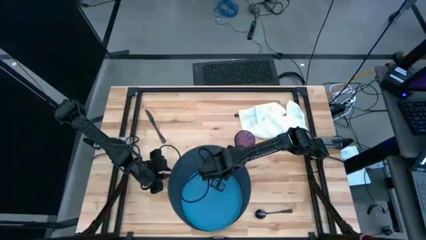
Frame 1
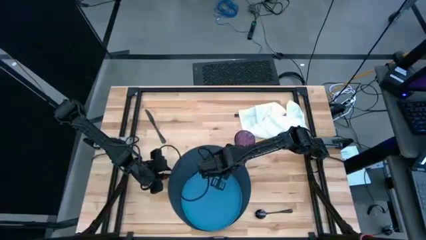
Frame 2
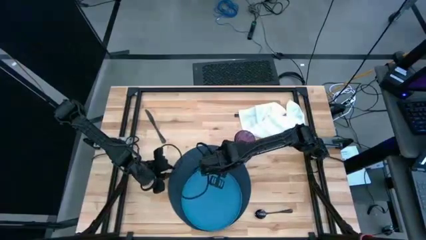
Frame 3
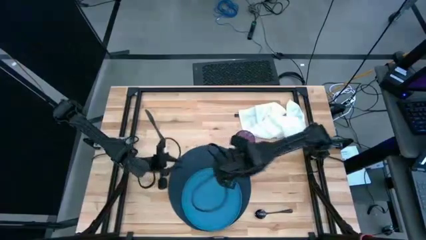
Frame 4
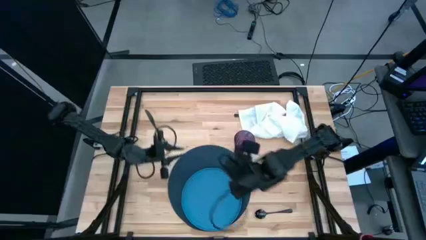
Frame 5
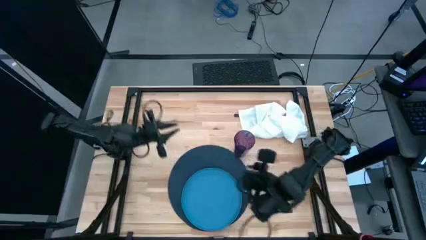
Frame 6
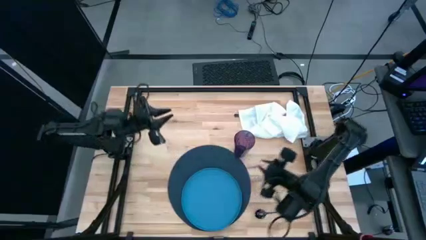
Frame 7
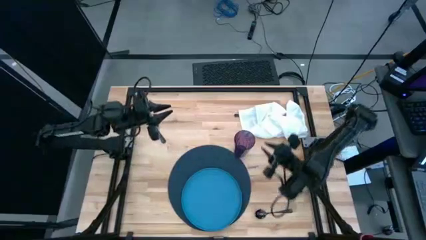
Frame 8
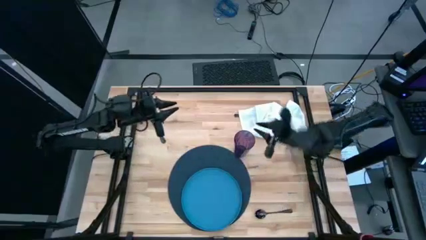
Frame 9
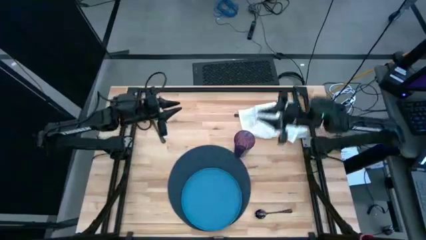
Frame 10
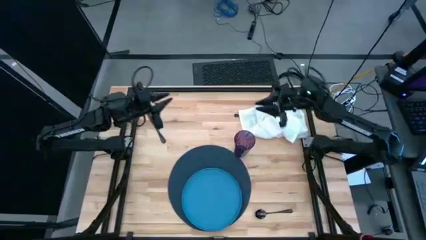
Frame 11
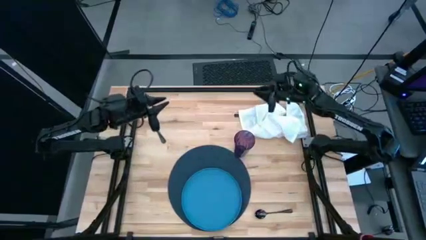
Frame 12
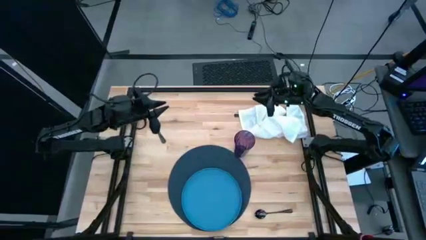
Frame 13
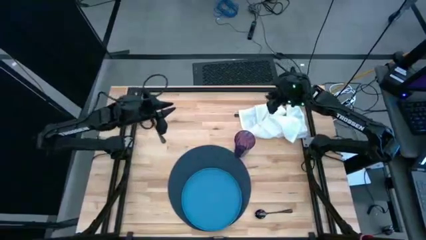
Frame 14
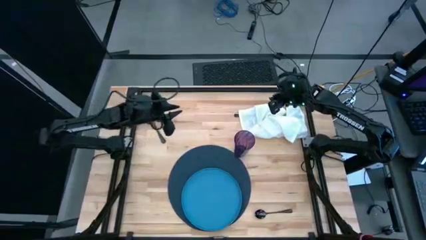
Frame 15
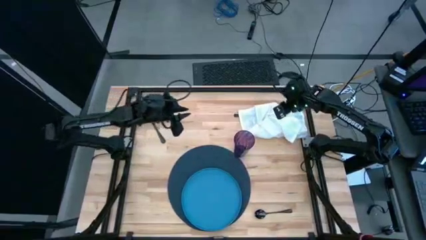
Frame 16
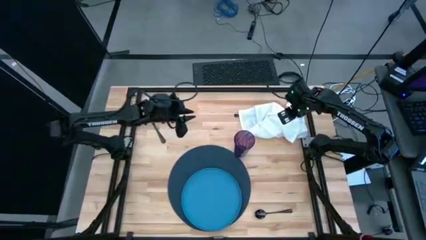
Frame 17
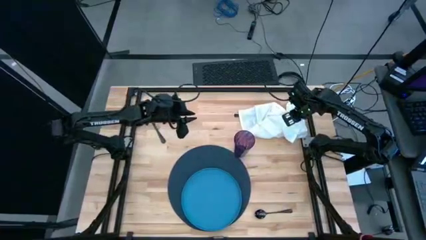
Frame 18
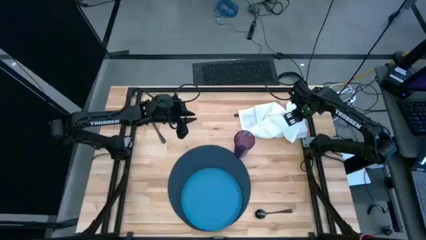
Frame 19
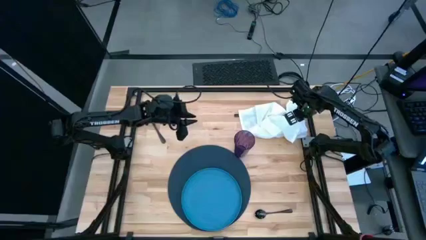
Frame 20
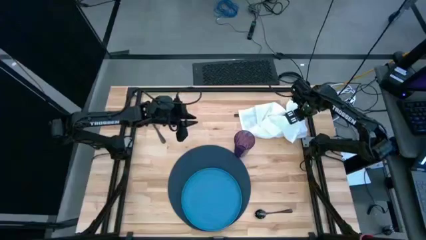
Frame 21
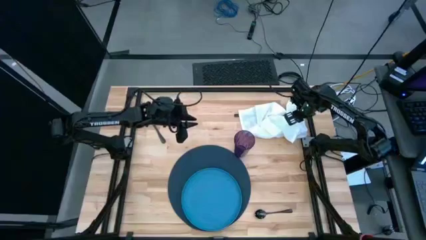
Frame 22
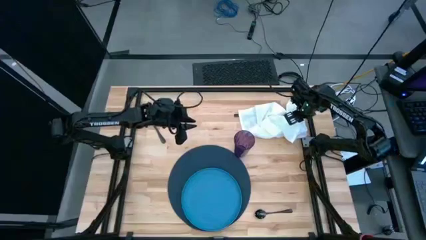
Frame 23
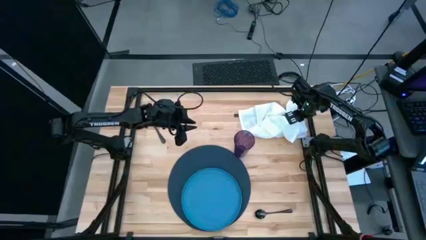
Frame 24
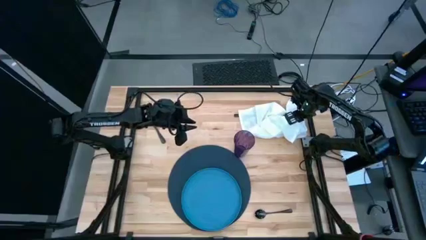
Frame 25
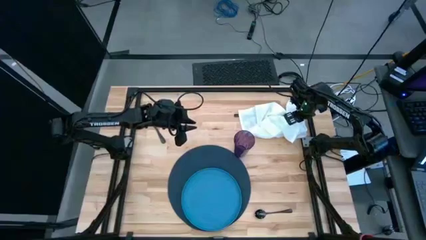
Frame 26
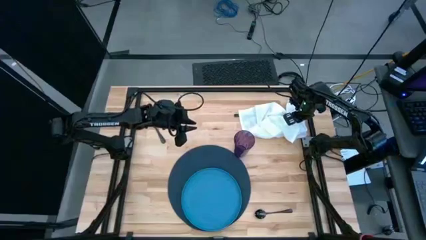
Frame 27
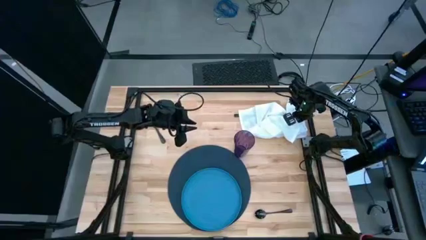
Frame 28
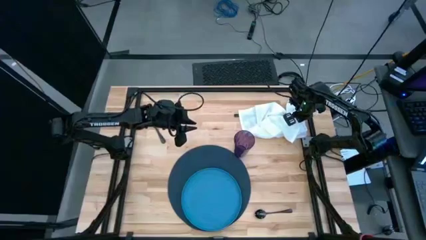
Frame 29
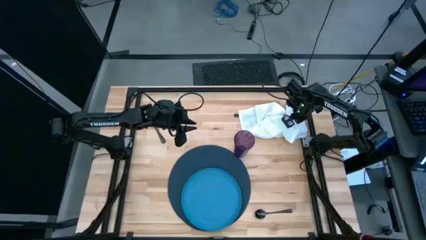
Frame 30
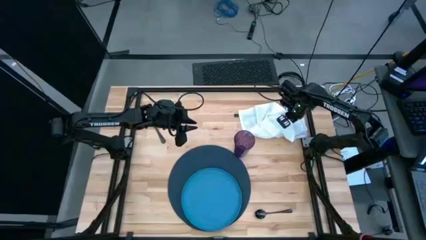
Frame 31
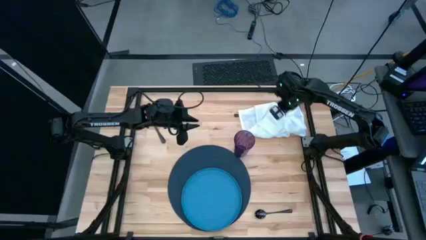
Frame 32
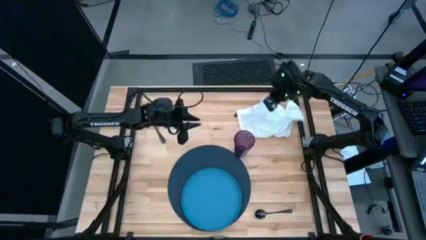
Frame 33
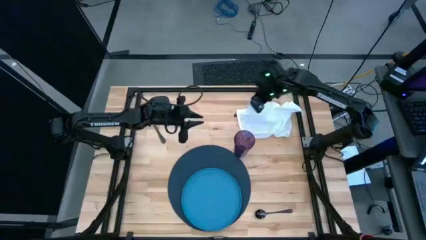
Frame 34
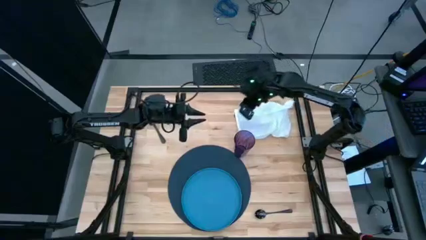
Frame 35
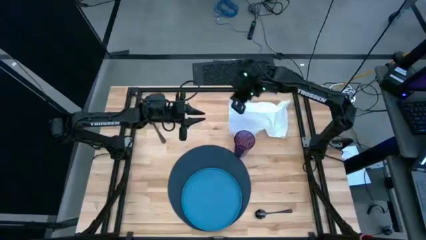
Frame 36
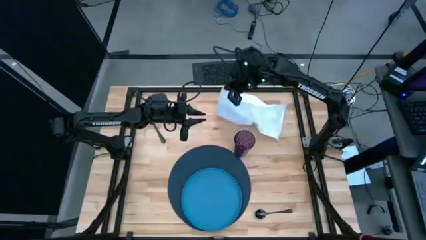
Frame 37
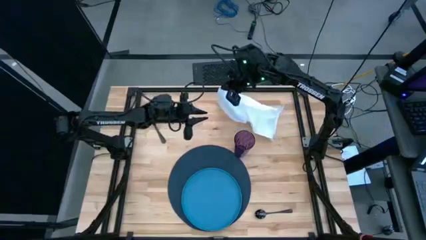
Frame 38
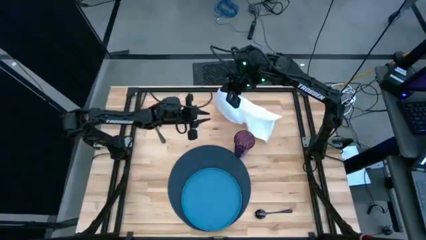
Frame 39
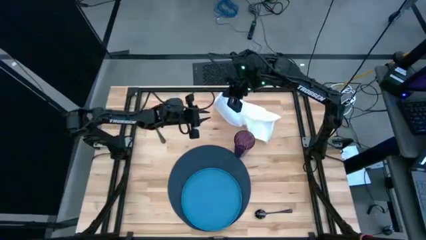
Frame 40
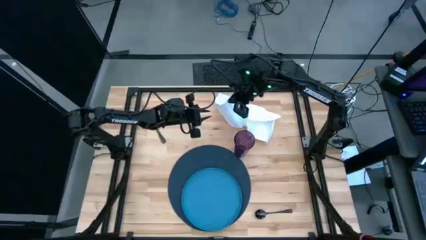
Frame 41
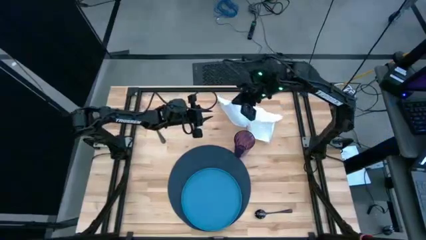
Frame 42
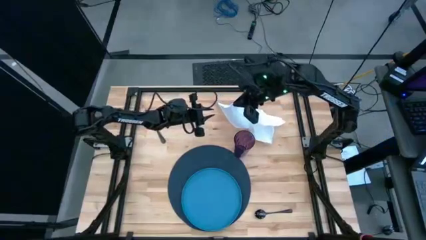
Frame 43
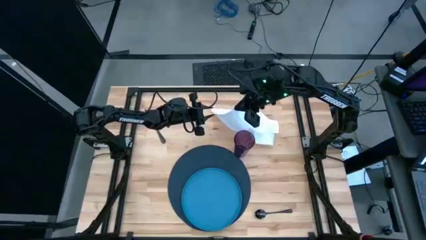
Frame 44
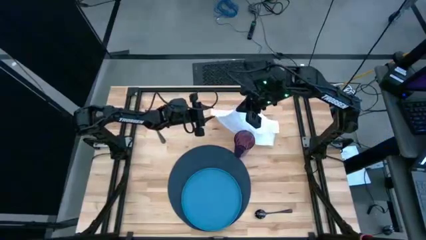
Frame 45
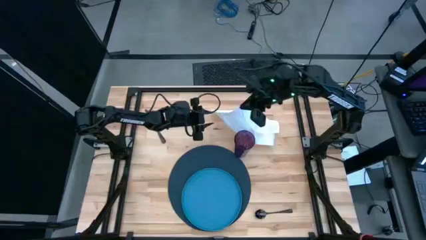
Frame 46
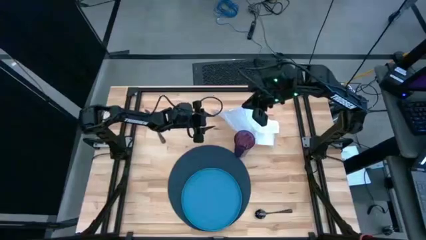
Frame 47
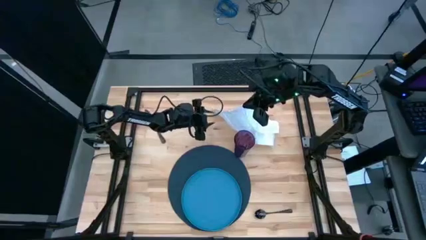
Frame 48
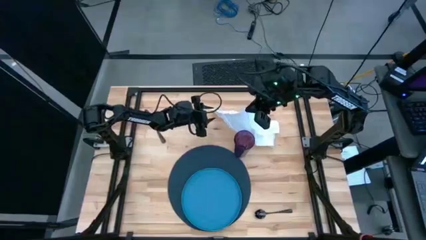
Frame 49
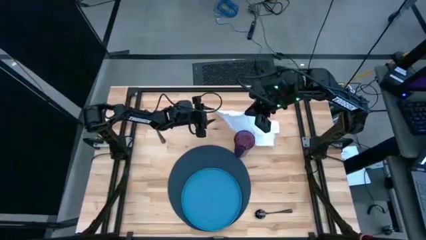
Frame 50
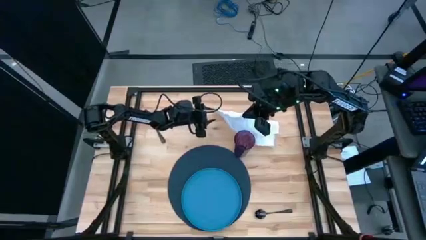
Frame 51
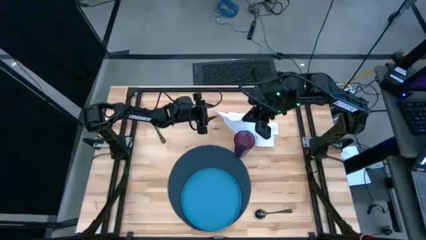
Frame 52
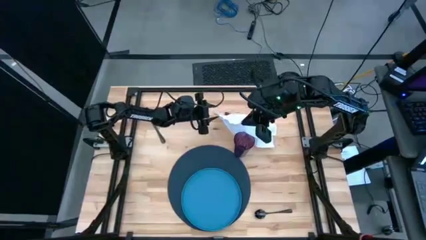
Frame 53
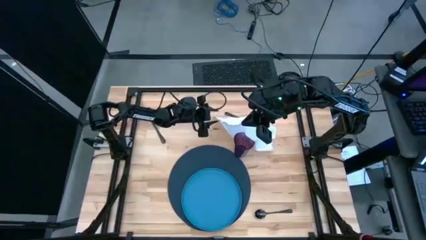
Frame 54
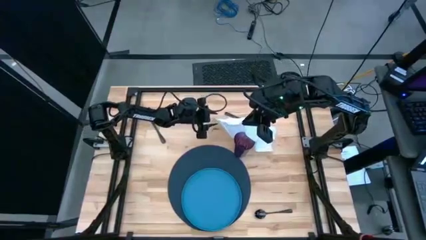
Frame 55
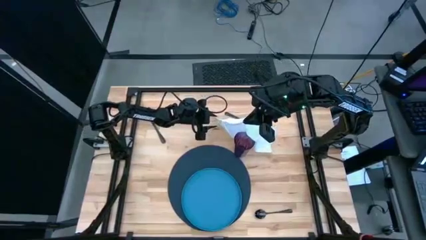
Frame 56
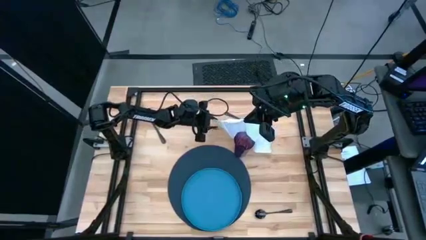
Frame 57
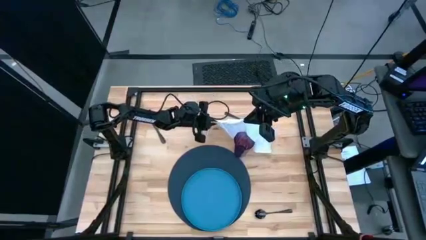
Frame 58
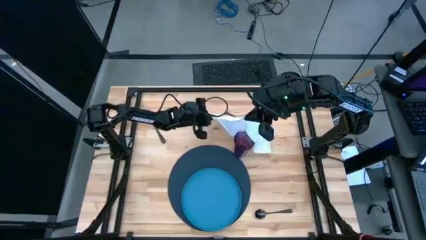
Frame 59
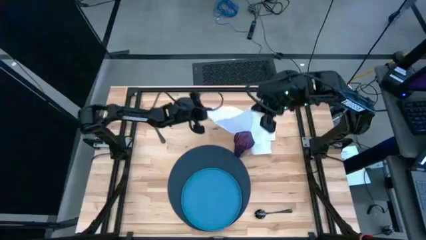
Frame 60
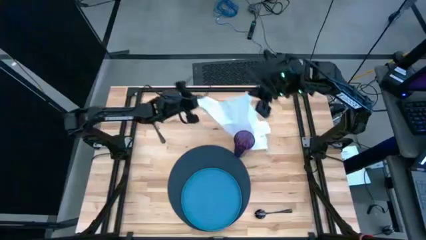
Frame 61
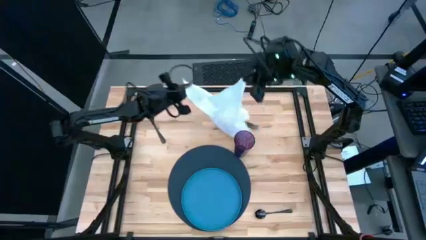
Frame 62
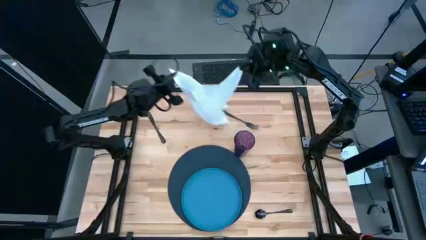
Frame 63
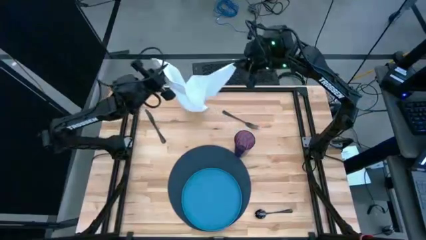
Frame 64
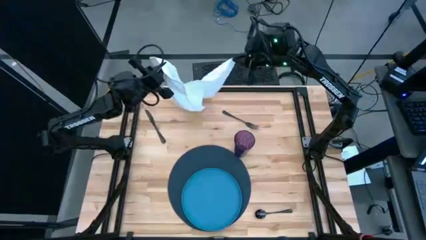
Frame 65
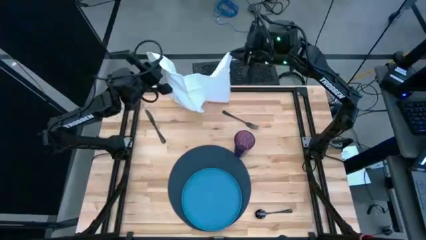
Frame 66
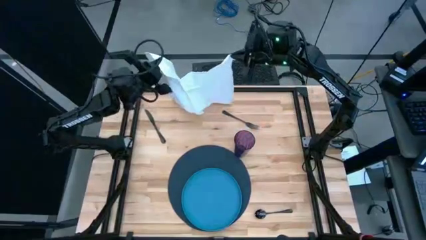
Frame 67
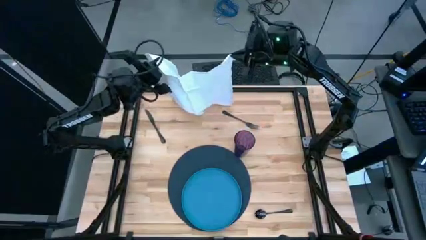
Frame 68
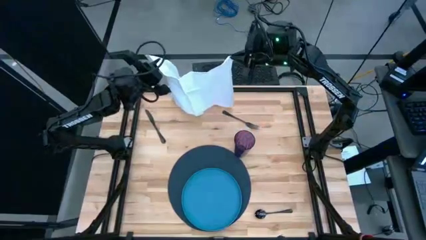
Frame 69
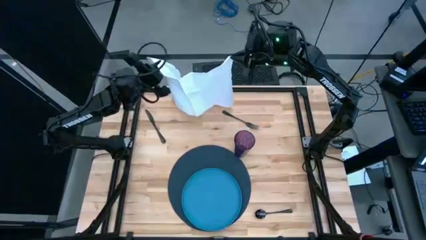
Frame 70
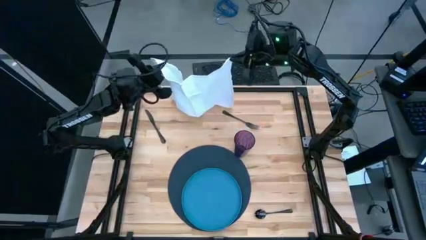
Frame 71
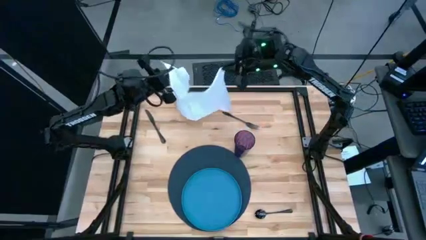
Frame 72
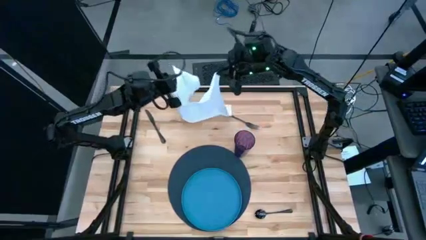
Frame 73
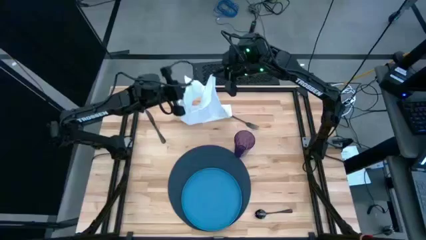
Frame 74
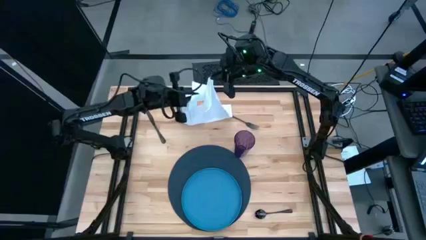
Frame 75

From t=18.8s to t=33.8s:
Task: Set table place
Fold the white napkin
